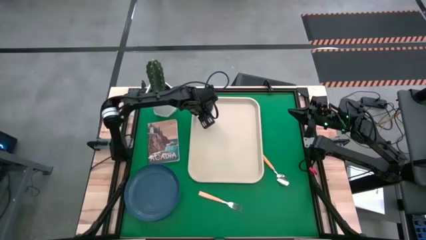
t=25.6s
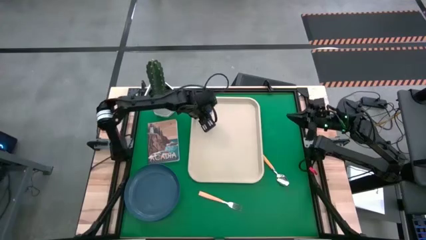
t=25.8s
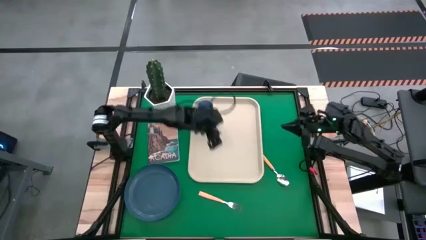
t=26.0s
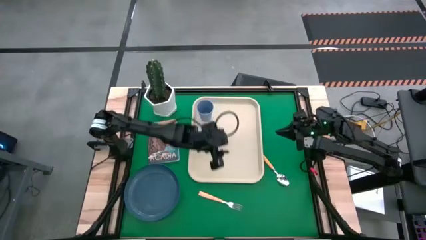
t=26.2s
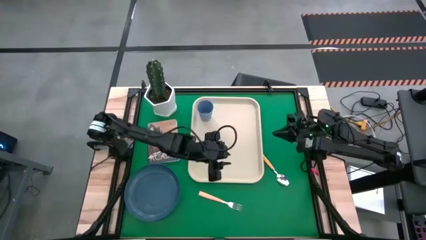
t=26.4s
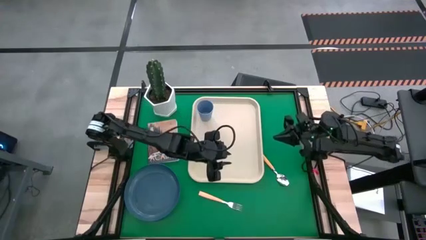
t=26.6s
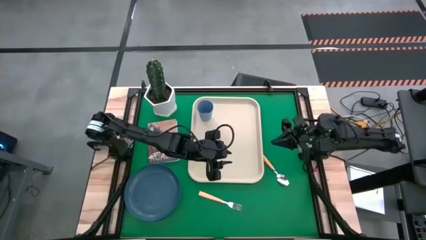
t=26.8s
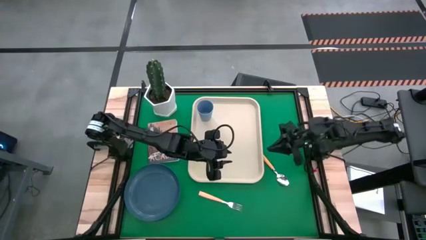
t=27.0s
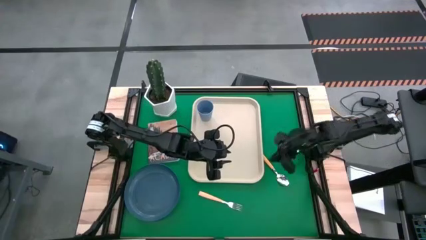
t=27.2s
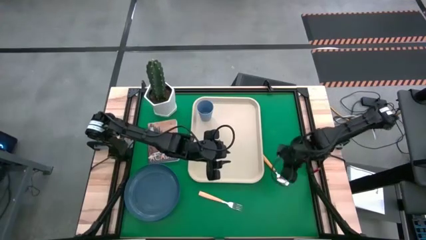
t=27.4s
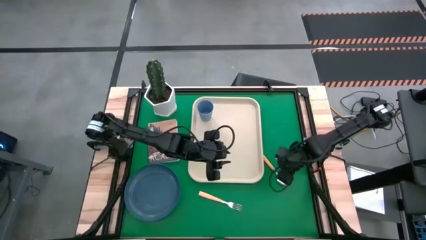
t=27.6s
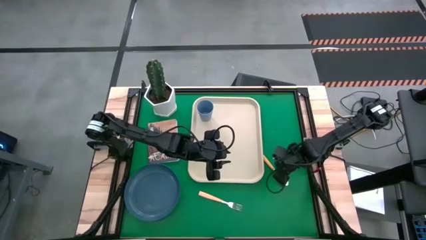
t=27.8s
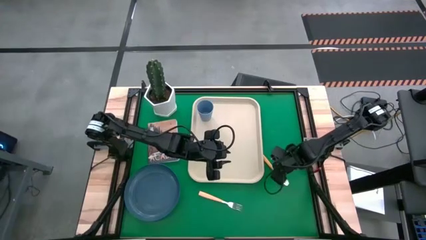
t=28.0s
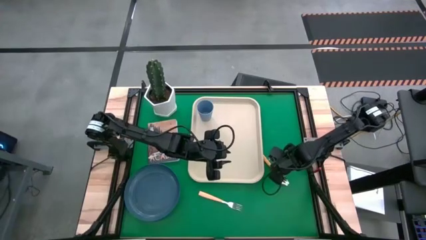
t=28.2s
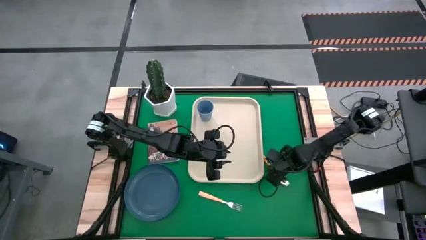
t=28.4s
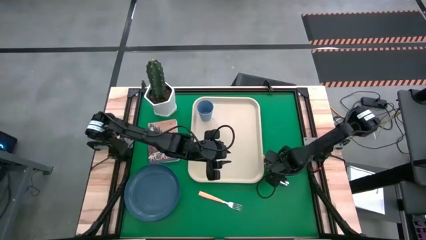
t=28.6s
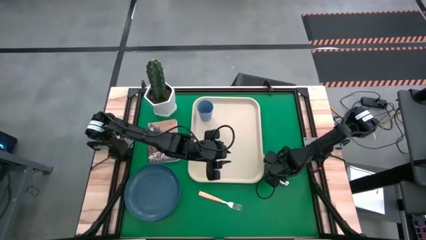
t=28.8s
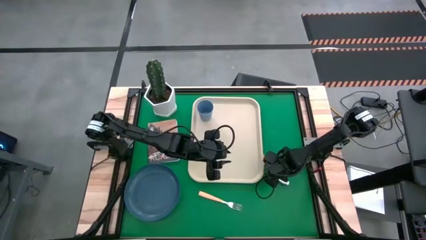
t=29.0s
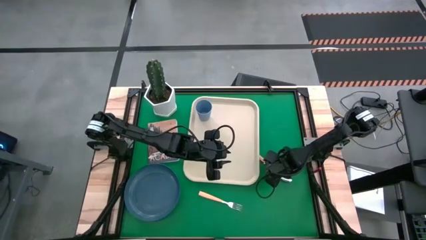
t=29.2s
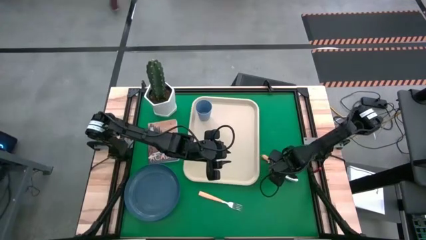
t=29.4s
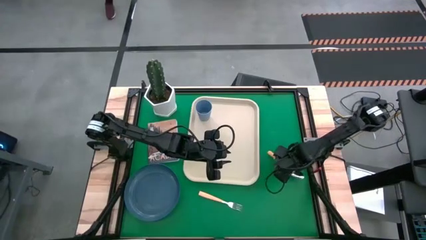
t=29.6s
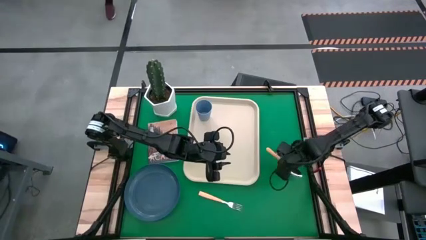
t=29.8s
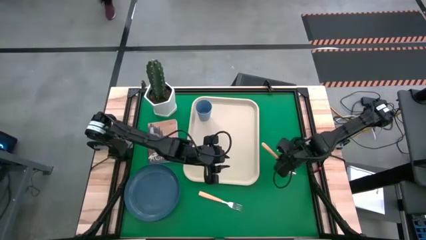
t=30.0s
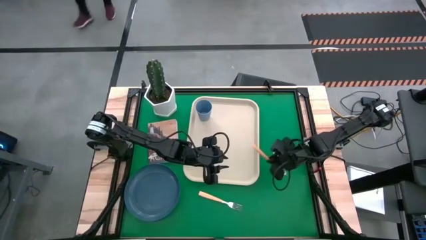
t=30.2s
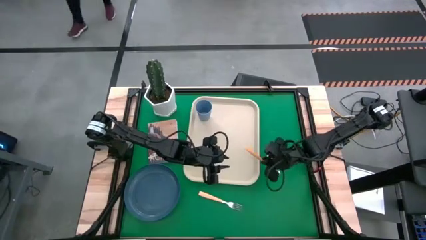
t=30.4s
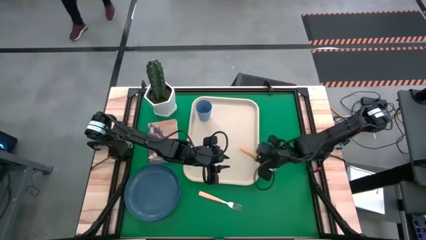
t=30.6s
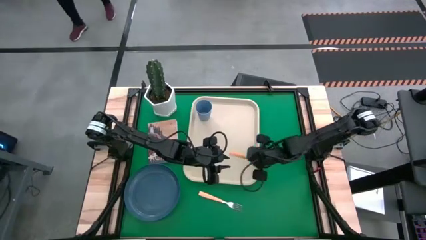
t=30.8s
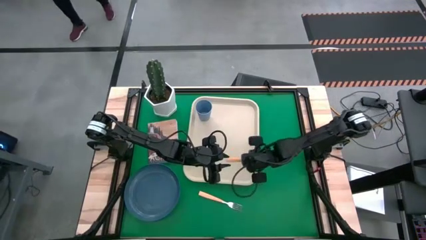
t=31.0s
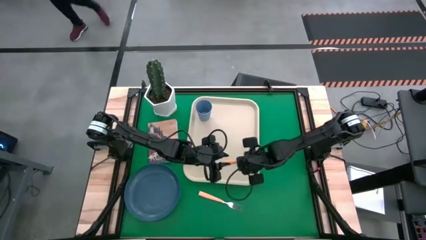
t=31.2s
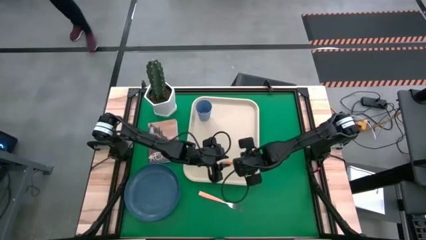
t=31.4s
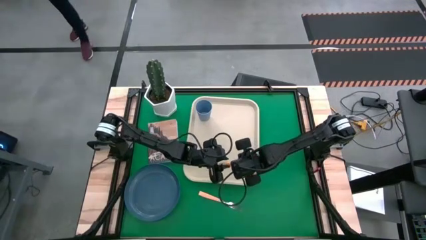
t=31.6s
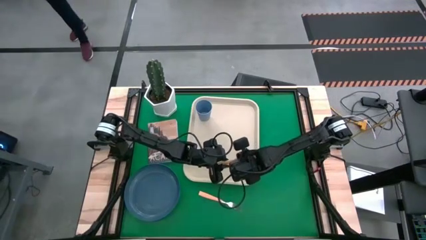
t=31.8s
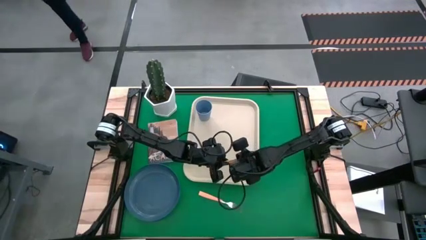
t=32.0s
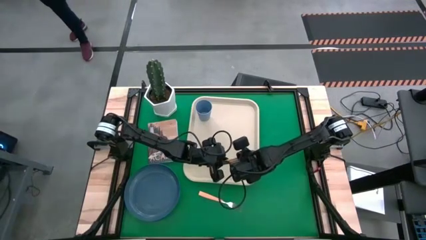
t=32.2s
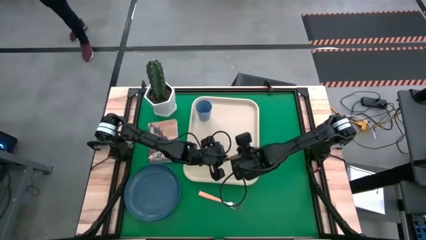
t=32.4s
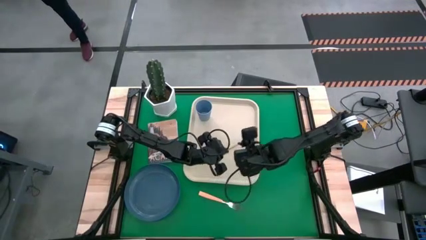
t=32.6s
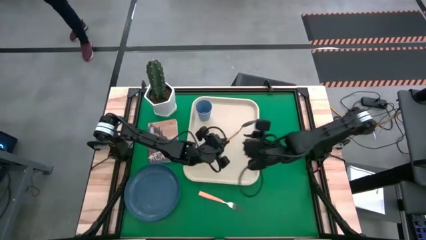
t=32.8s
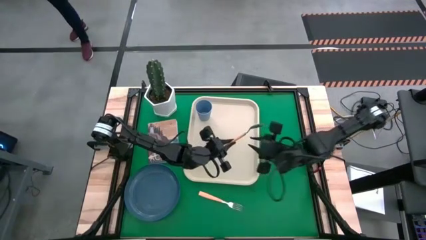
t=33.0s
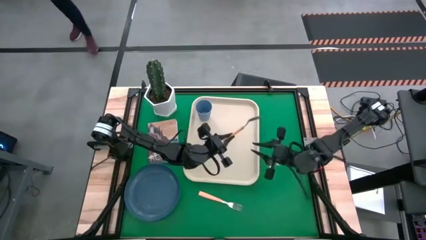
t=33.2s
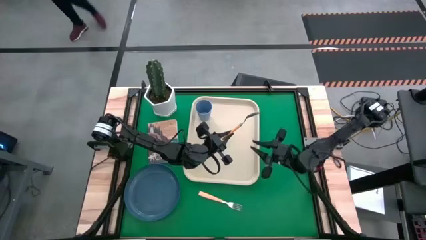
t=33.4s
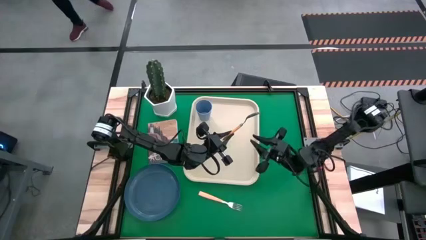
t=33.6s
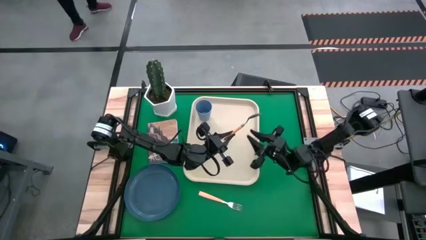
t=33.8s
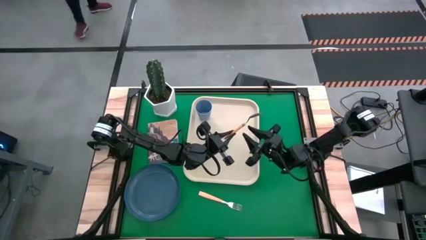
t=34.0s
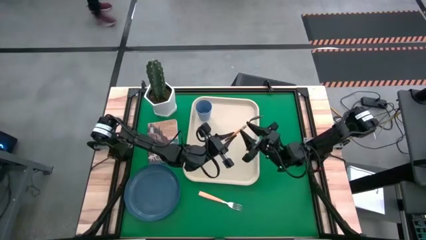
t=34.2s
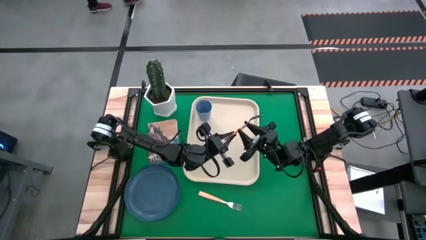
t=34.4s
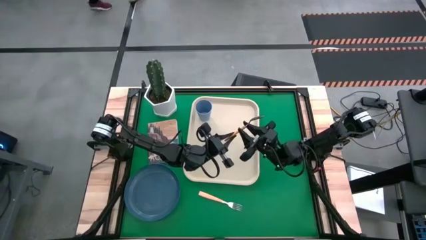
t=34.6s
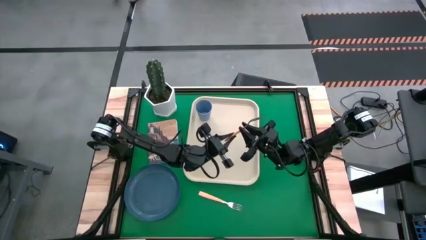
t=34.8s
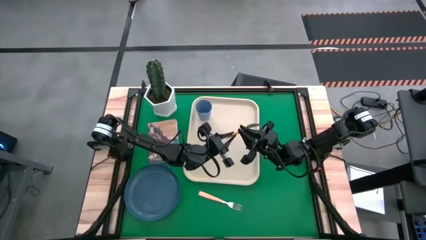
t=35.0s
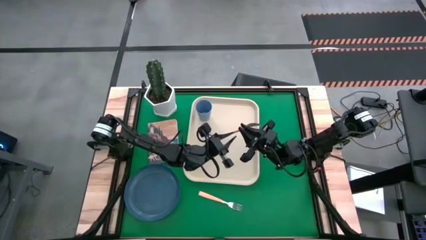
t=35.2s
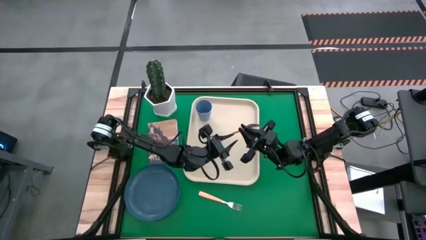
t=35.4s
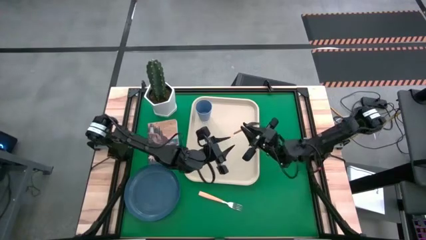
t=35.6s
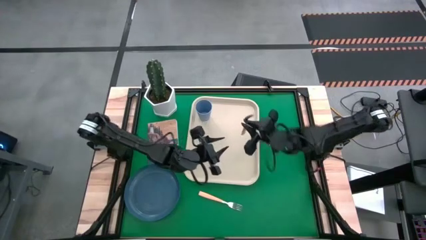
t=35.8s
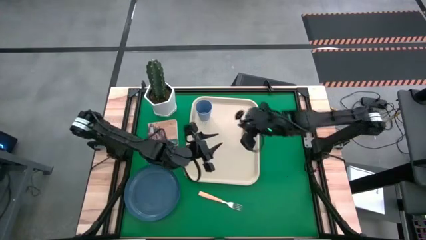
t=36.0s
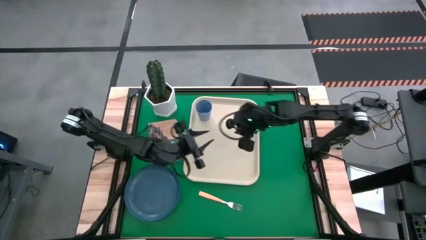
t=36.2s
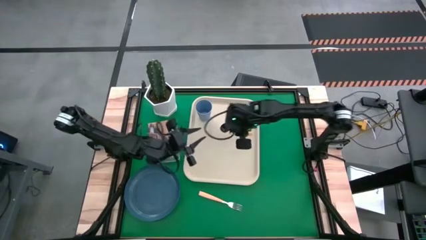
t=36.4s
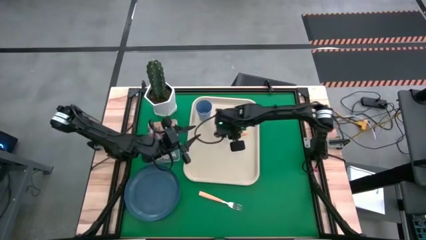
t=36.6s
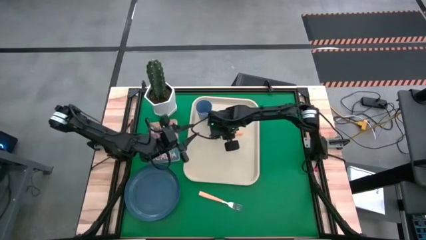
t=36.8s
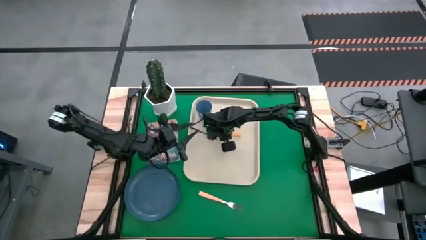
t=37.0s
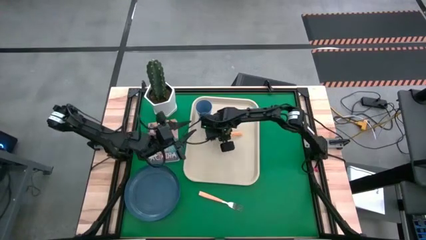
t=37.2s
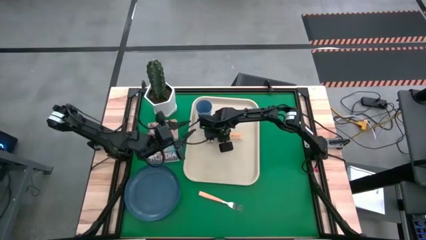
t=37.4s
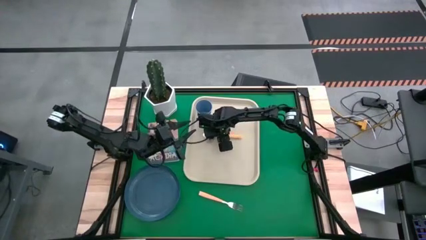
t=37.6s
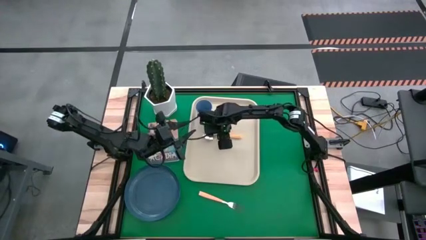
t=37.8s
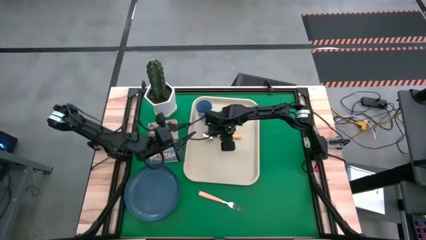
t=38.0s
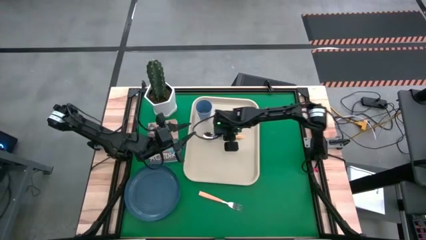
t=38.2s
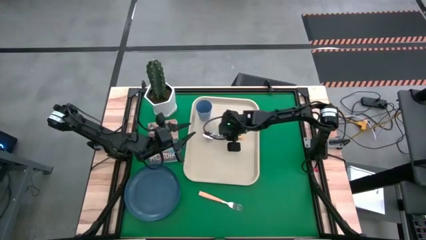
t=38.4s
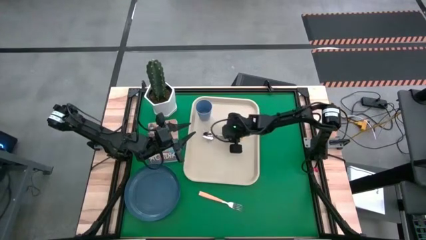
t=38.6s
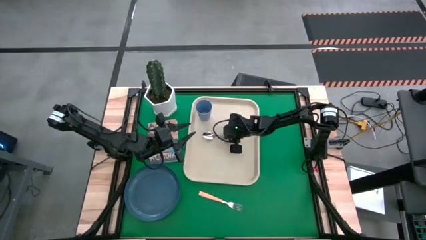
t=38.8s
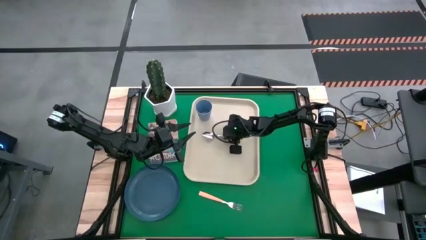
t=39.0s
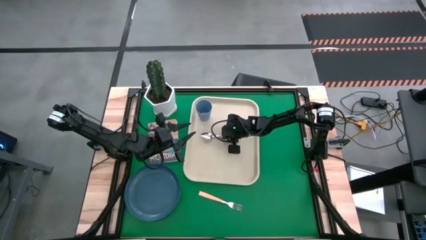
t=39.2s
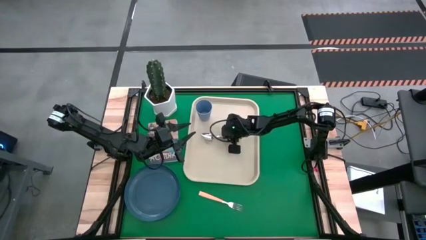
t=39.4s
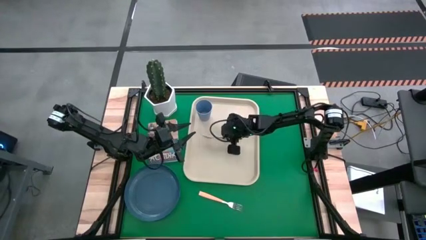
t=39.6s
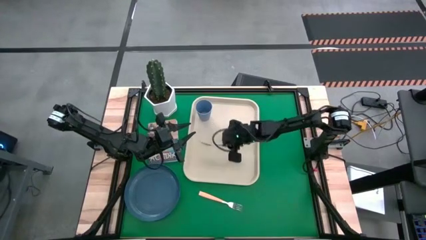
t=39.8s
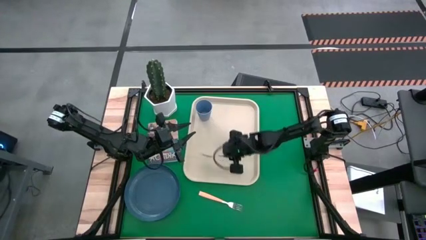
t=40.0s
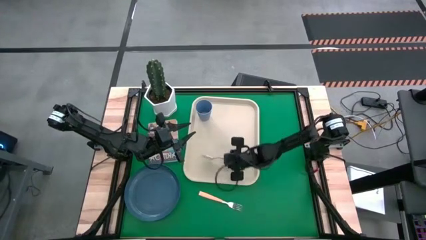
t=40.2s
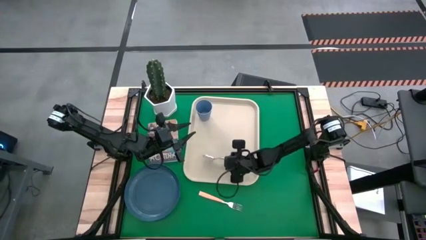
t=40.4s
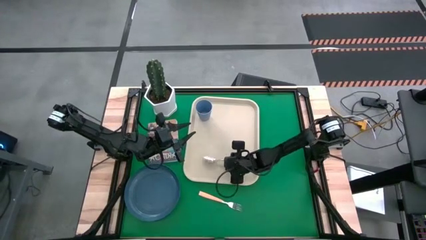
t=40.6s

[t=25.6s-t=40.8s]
Task: Pick and place plate/cup/fork/spoon on tray
Put the orange spoon on the left side of the white tray
